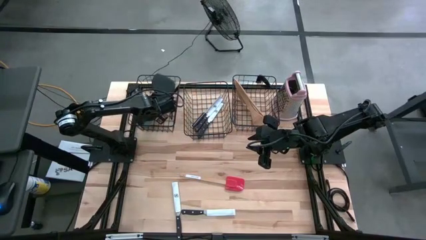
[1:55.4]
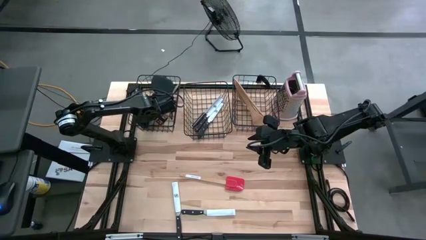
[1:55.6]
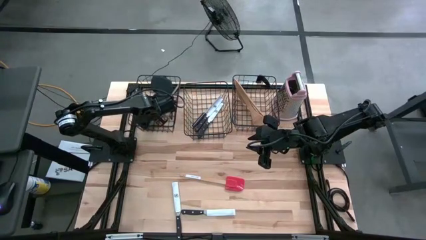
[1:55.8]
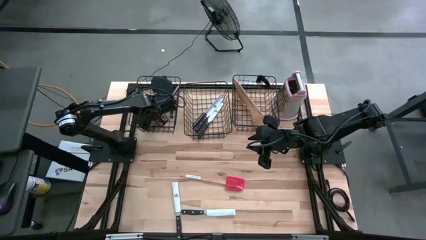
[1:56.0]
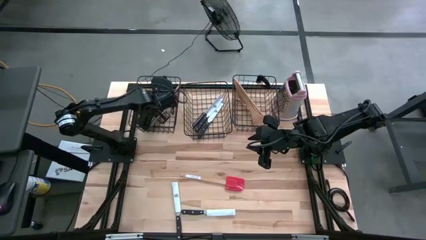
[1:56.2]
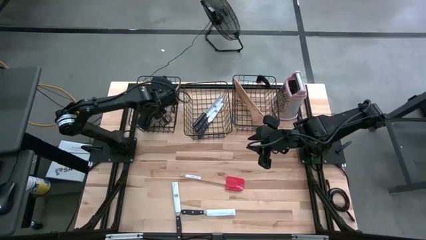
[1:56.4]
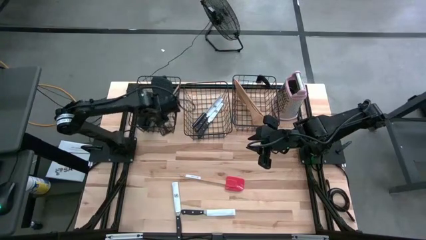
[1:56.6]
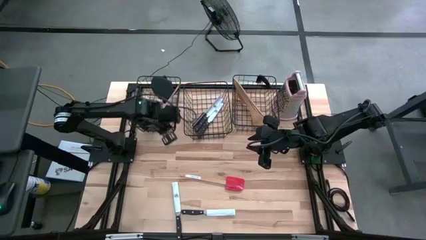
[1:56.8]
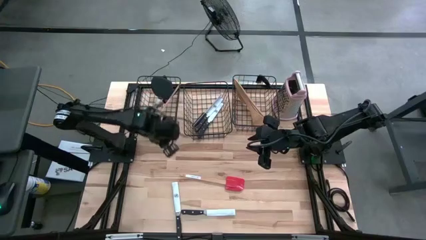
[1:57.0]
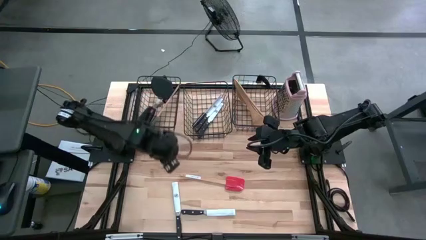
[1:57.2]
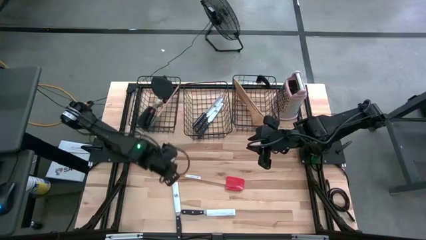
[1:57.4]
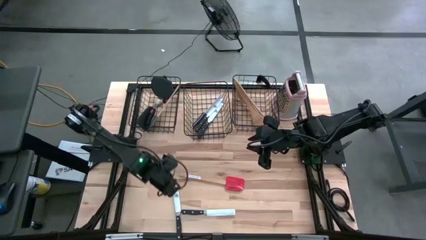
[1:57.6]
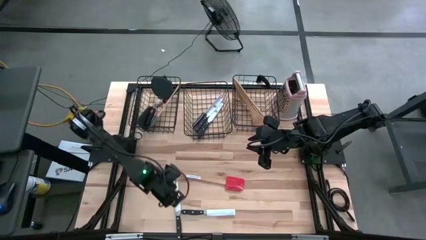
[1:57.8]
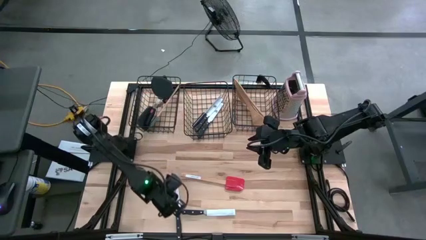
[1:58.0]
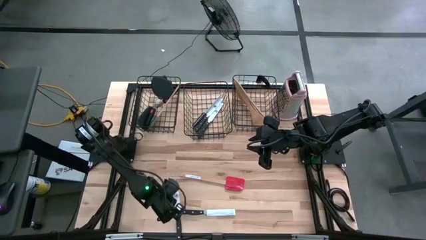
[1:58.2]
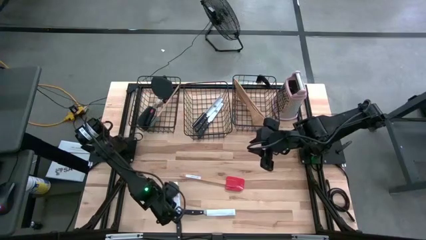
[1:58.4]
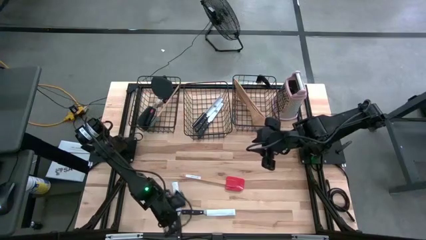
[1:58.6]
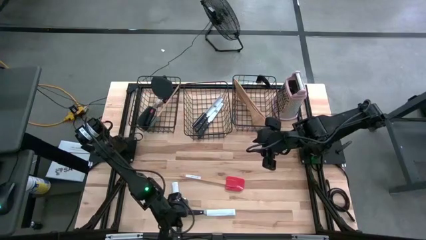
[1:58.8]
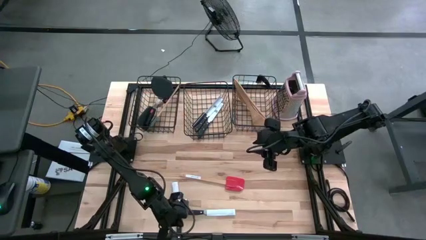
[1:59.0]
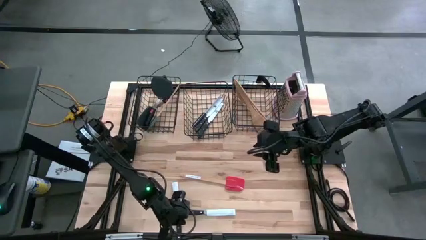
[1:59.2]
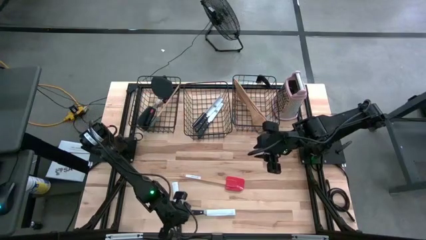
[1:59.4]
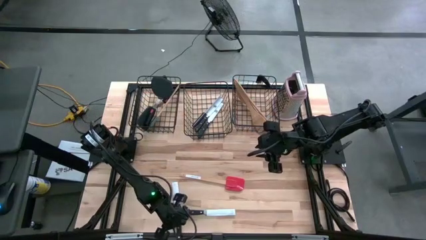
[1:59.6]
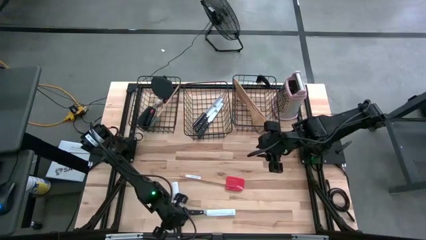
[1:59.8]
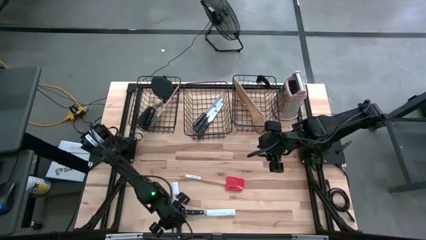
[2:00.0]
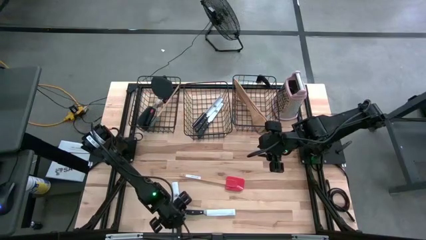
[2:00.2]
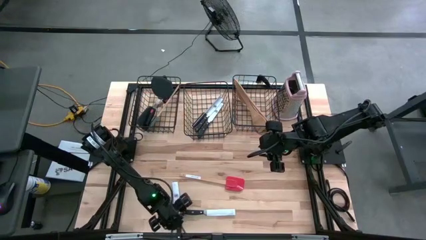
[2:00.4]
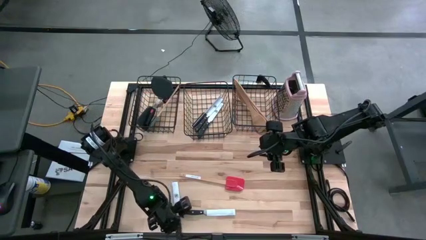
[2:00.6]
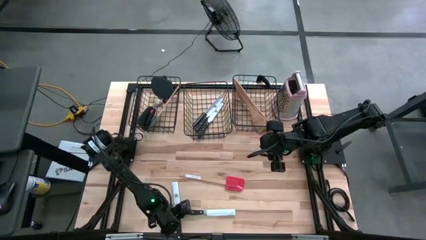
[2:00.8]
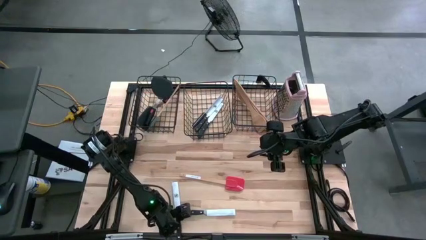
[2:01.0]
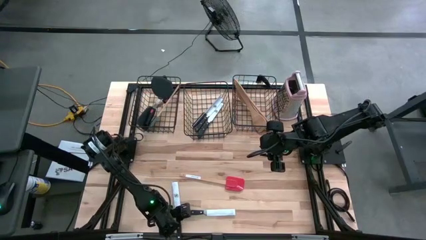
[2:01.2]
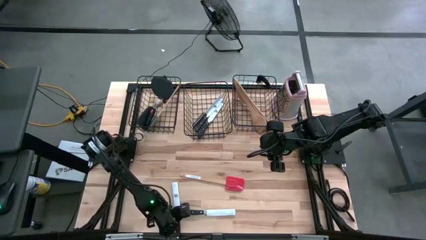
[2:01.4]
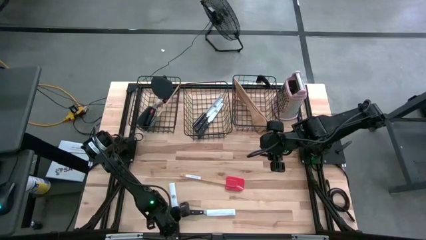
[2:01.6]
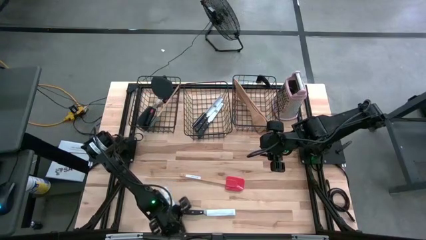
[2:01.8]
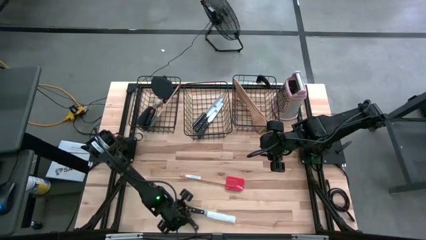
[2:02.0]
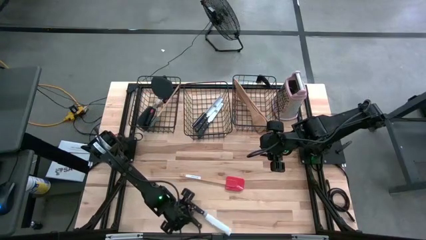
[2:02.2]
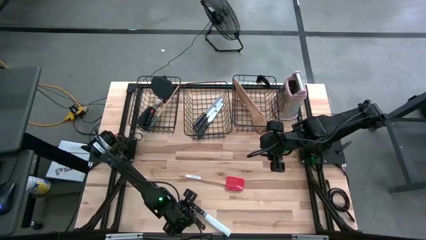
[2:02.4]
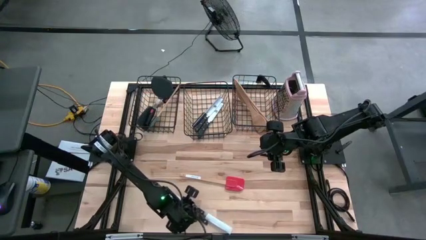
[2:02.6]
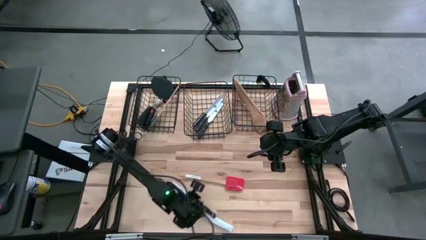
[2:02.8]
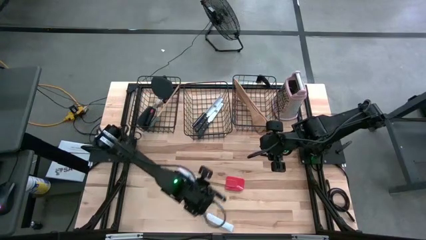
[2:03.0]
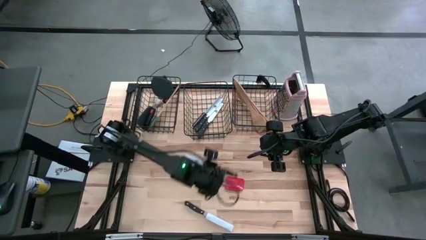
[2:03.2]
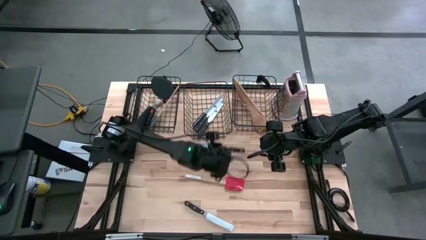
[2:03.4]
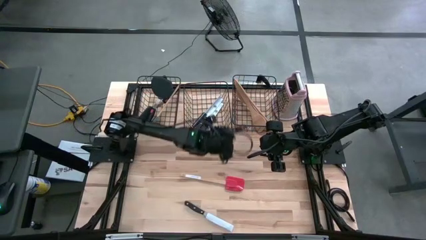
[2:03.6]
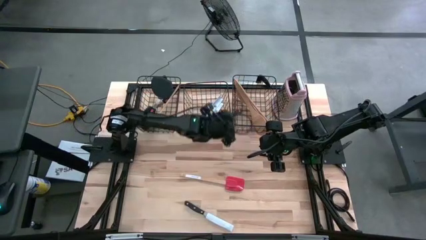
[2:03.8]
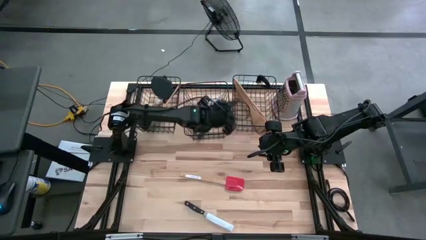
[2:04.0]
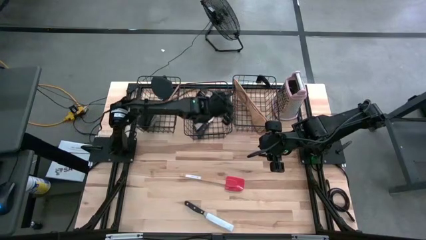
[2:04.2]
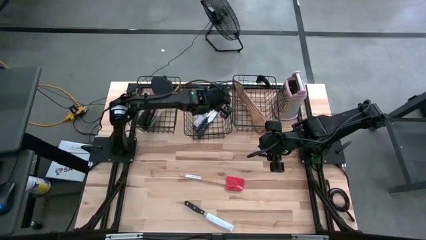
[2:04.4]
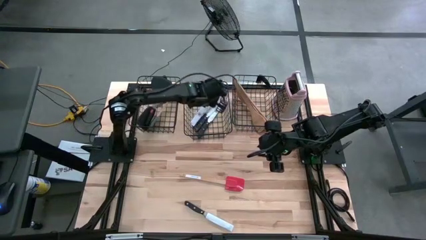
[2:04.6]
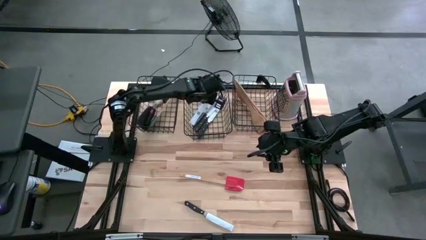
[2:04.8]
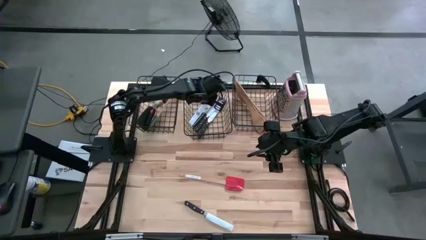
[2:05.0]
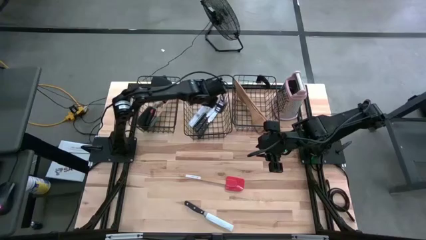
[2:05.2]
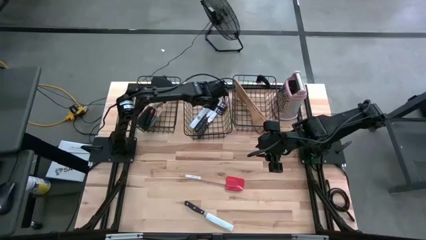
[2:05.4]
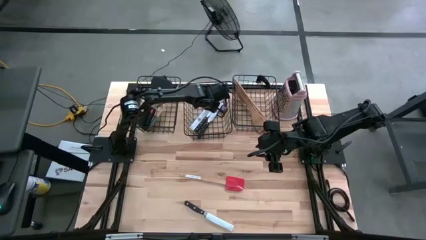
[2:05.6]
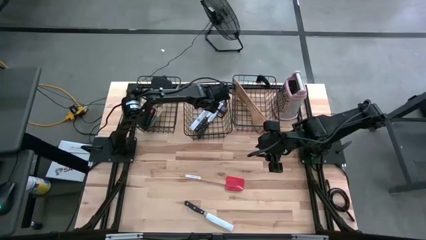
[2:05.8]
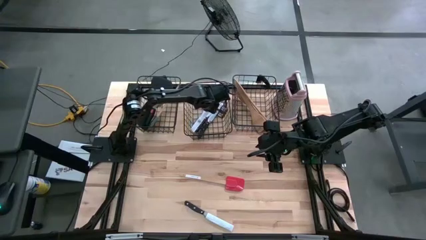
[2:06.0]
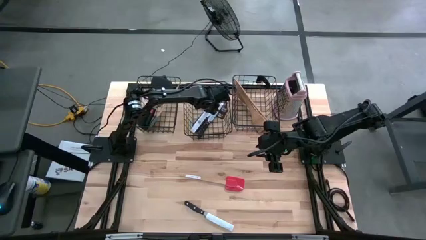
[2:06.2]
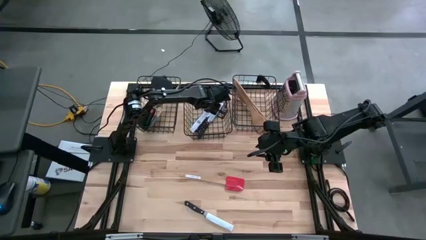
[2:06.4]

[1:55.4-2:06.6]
Task: Pick & Place Kitchen Items
Put the black knife into the middle black wire basket

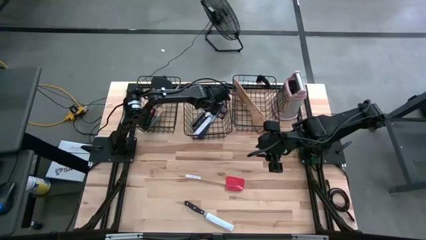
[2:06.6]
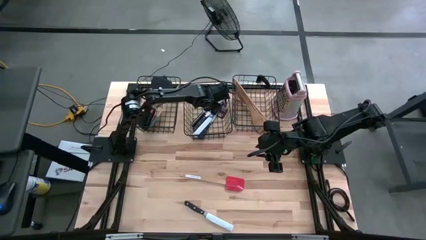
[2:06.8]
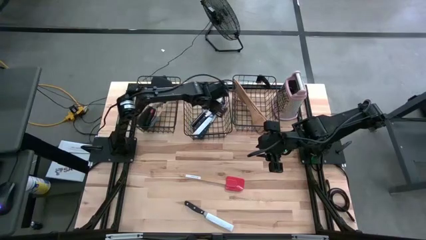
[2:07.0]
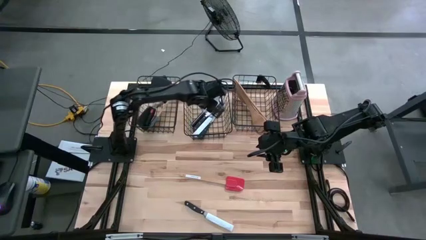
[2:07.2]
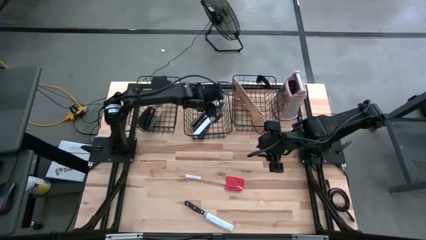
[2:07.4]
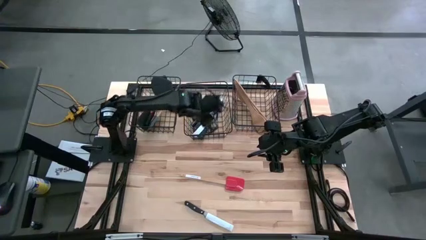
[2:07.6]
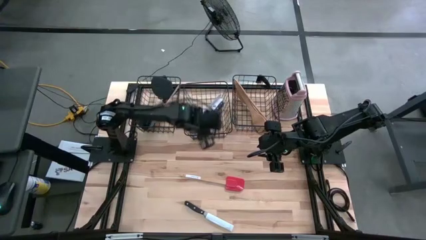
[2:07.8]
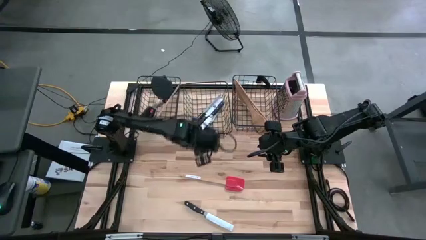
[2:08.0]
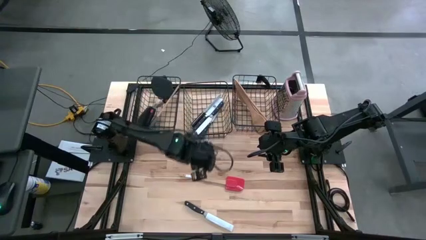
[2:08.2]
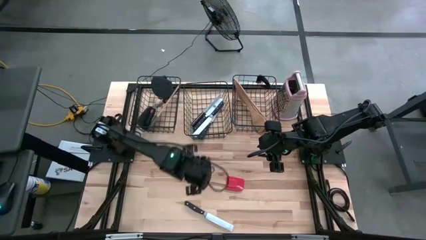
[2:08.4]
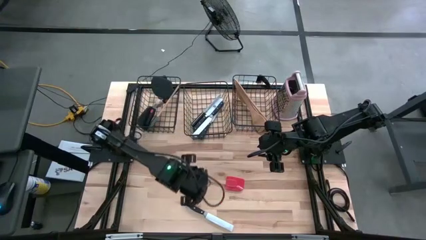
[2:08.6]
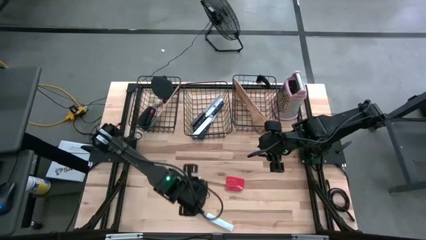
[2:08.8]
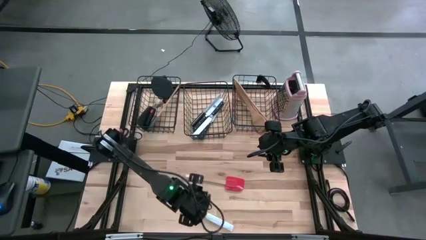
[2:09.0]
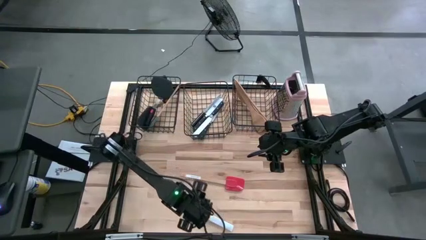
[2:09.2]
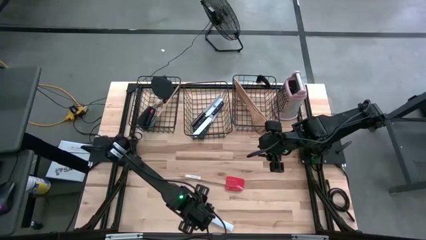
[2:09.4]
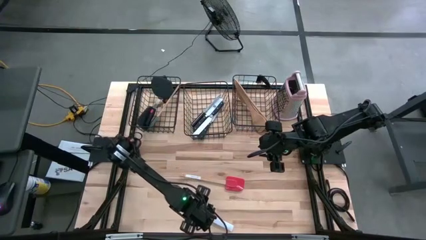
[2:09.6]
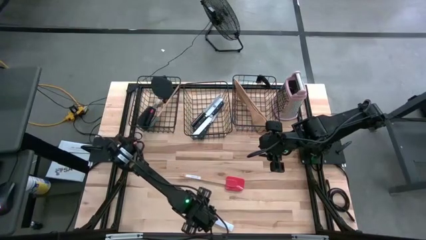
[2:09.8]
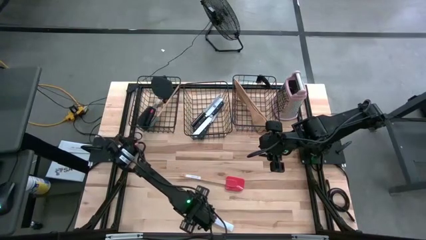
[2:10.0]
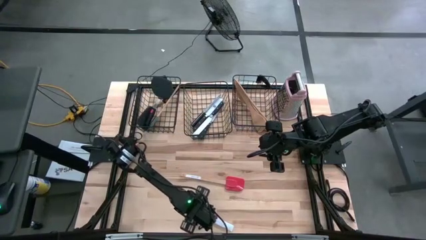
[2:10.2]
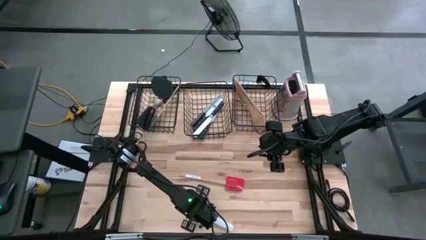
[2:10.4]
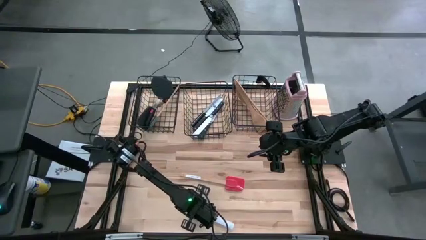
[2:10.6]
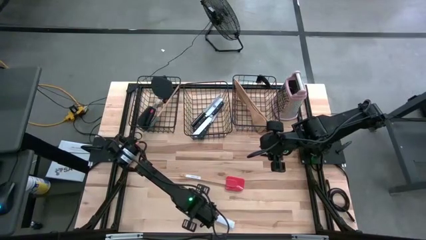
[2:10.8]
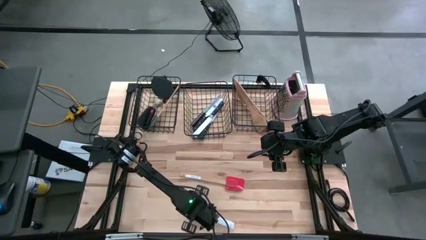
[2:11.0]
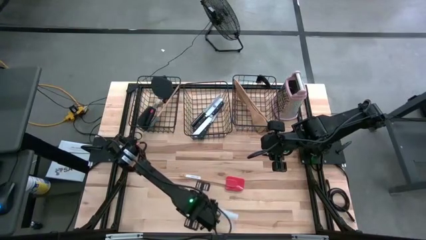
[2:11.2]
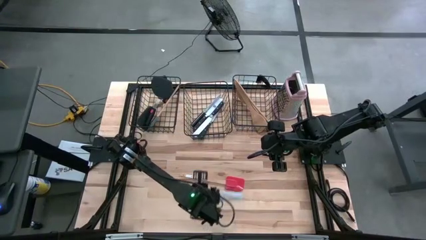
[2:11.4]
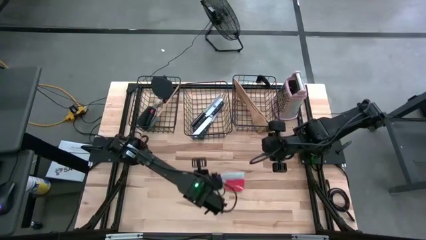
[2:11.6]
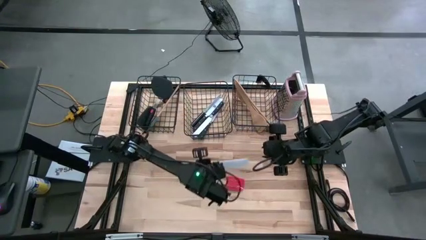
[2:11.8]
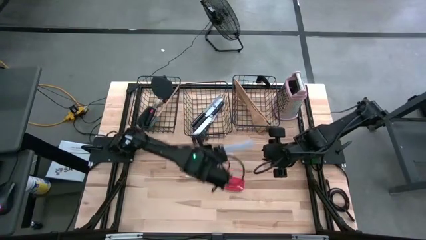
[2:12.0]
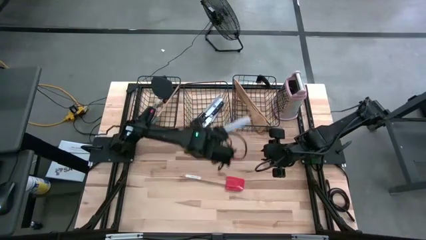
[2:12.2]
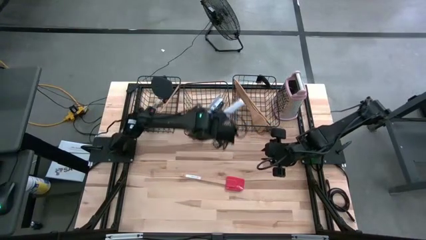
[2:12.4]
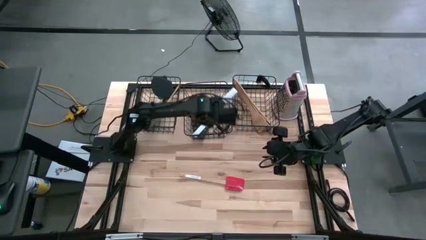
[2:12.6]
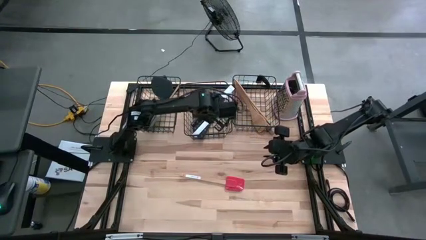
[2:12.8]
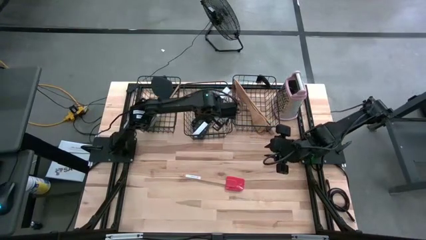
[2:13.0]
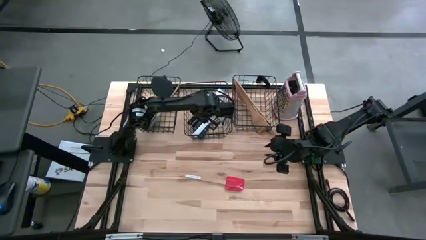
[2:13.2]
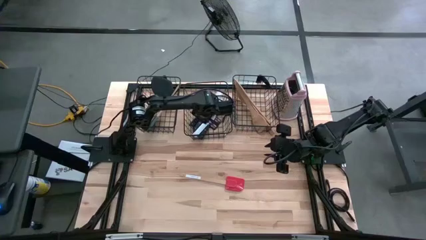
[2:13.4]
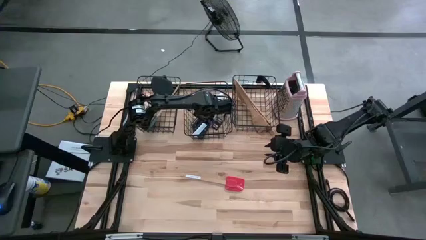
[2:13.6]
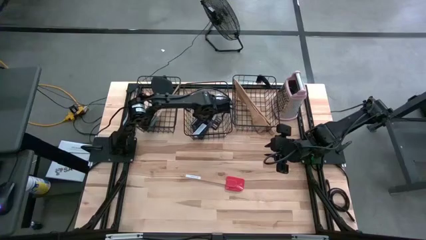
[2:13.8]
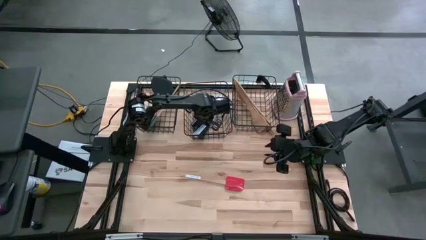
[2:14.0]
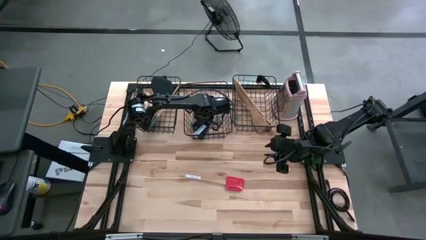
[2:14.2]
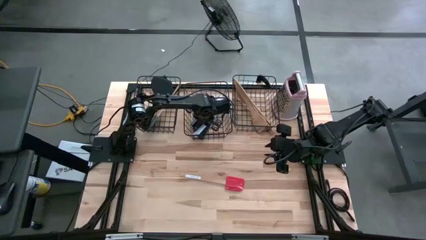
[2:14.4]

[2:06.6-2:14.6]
Put the black knife into the middle black wire basket
